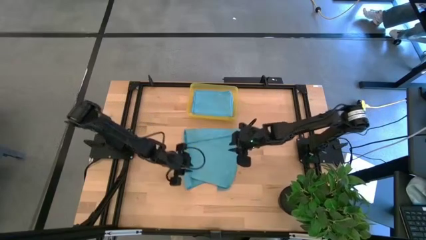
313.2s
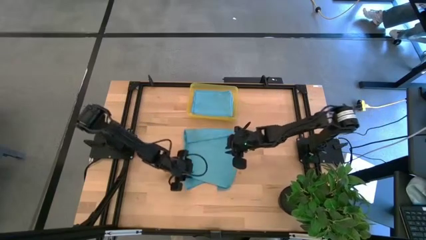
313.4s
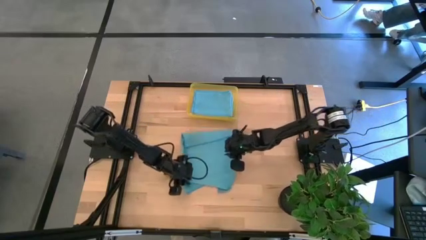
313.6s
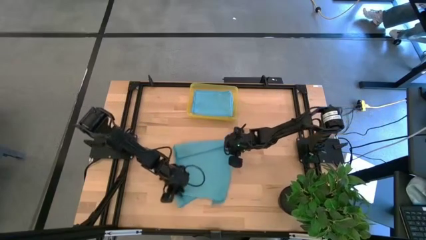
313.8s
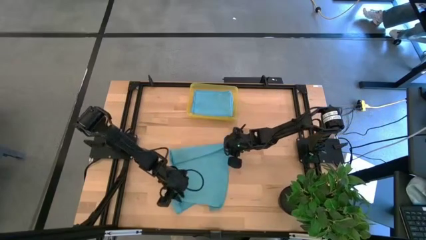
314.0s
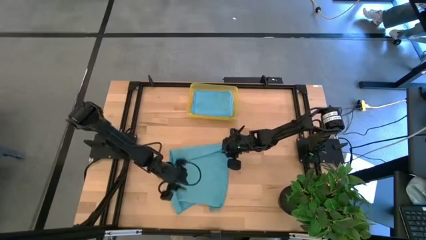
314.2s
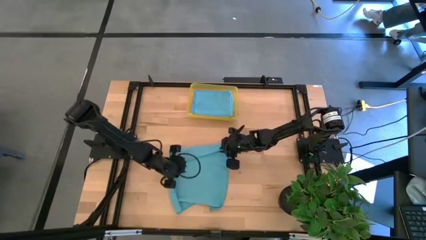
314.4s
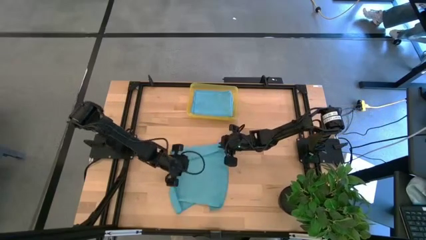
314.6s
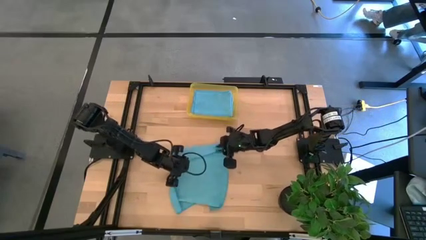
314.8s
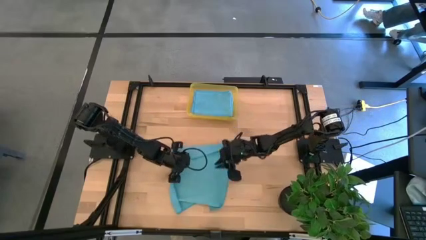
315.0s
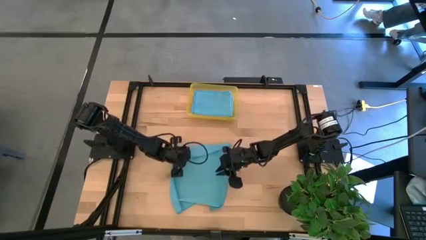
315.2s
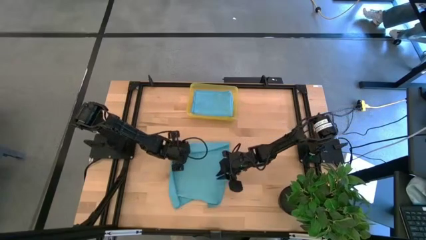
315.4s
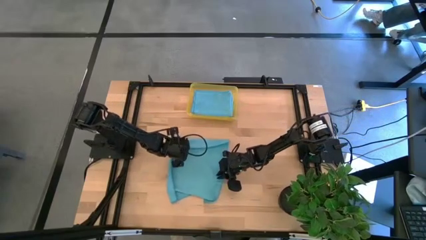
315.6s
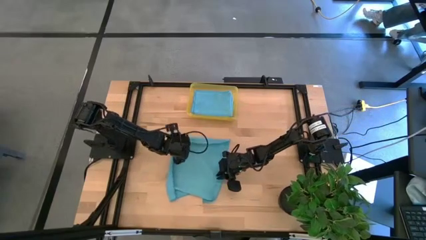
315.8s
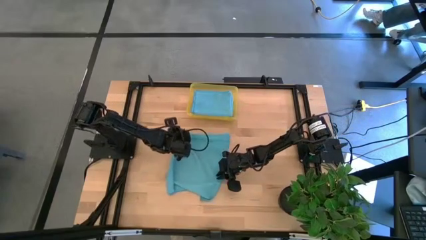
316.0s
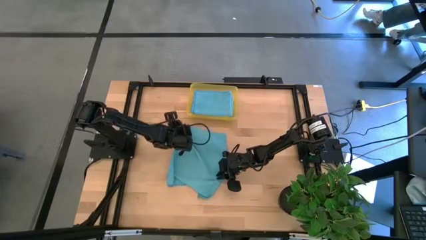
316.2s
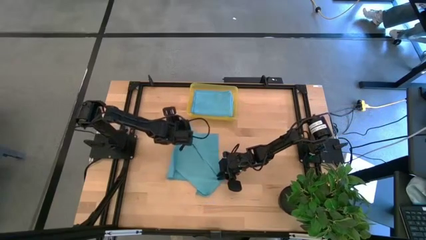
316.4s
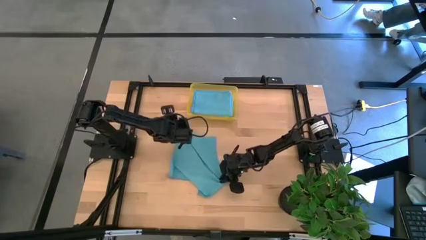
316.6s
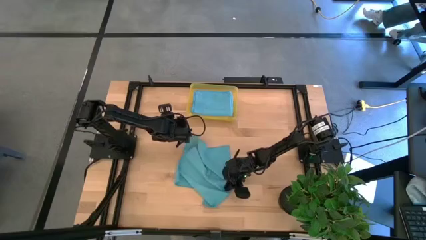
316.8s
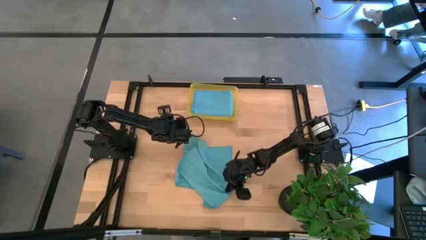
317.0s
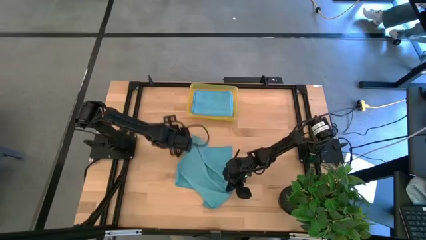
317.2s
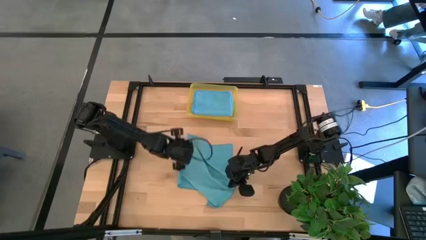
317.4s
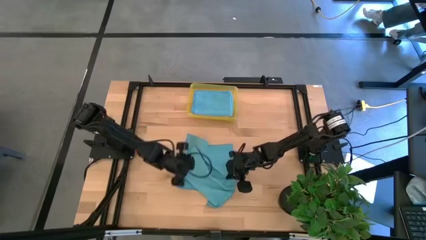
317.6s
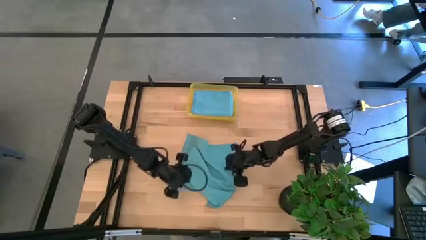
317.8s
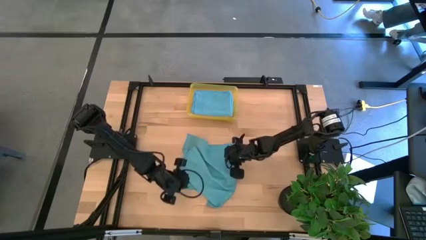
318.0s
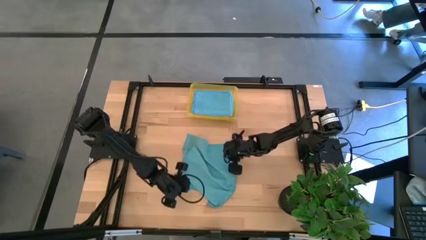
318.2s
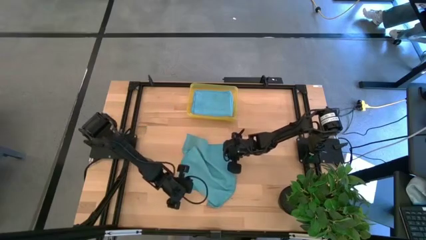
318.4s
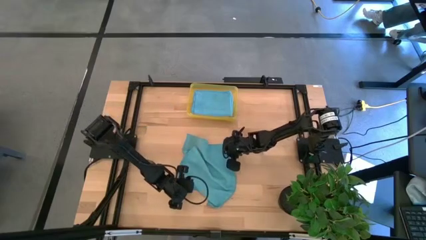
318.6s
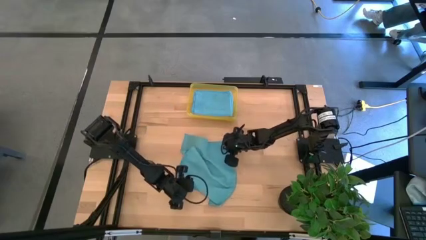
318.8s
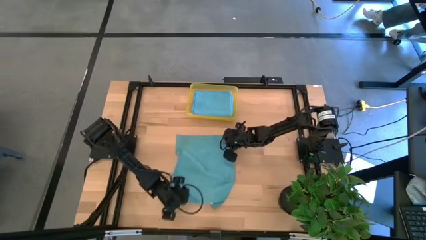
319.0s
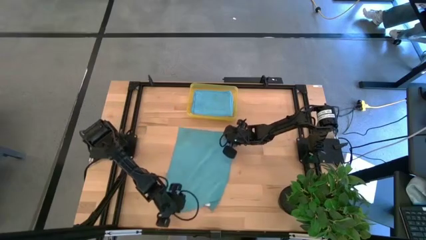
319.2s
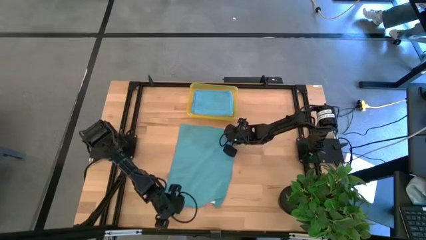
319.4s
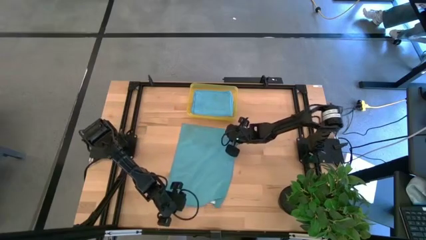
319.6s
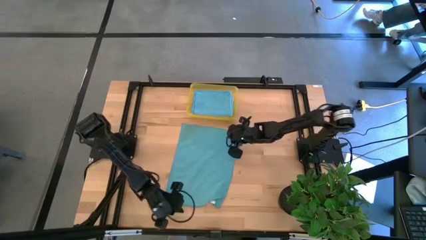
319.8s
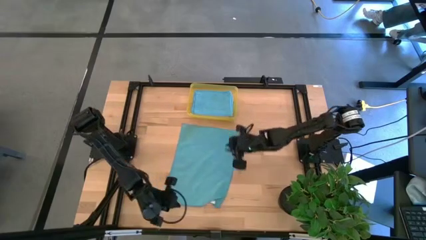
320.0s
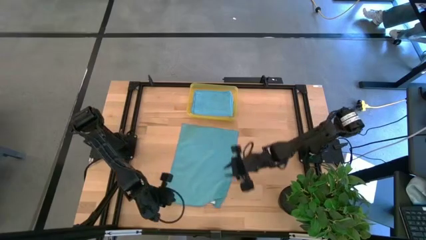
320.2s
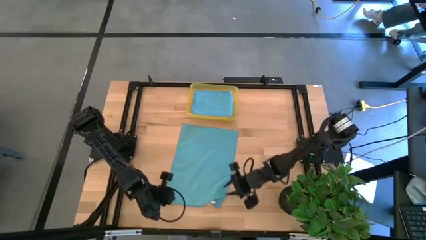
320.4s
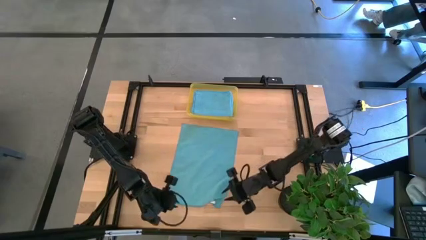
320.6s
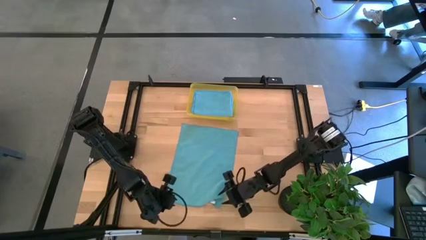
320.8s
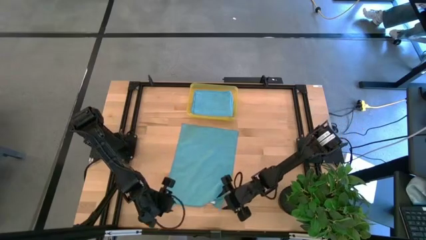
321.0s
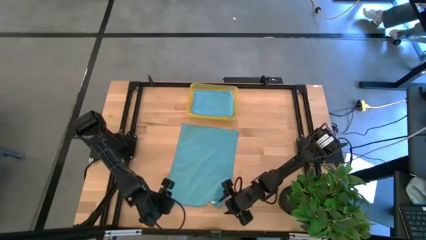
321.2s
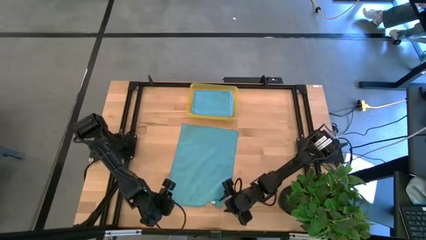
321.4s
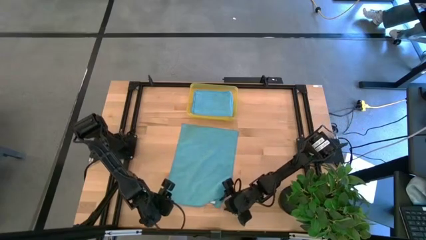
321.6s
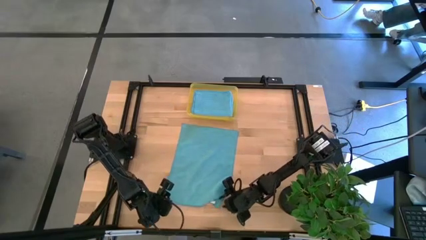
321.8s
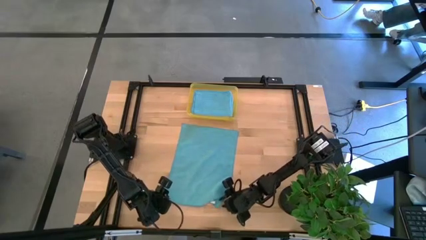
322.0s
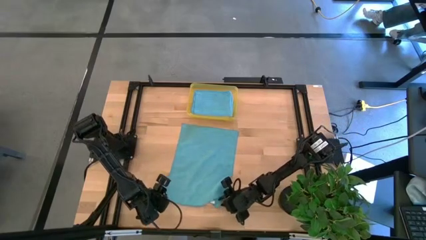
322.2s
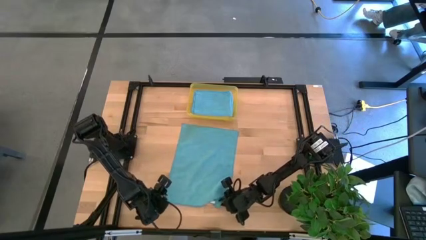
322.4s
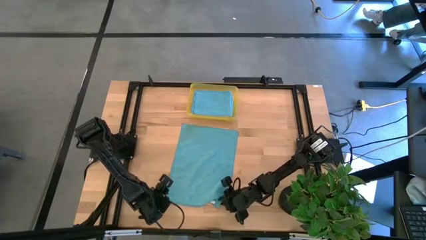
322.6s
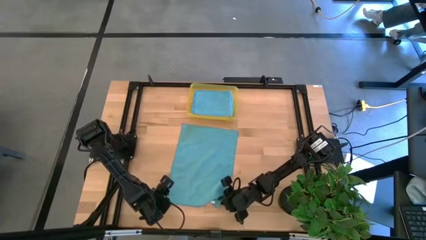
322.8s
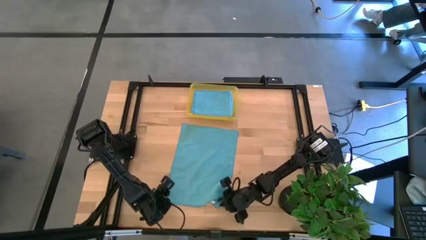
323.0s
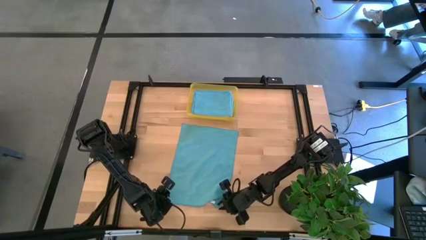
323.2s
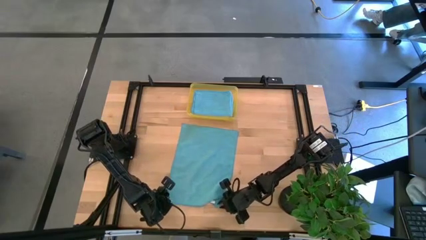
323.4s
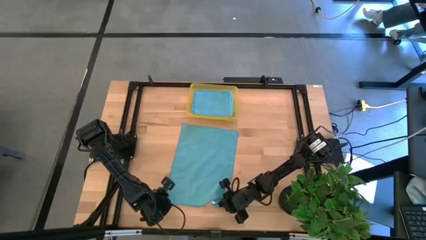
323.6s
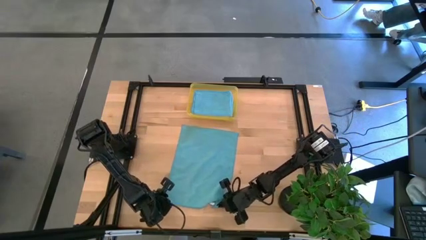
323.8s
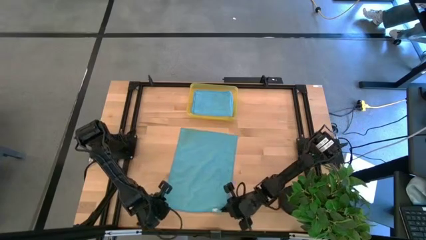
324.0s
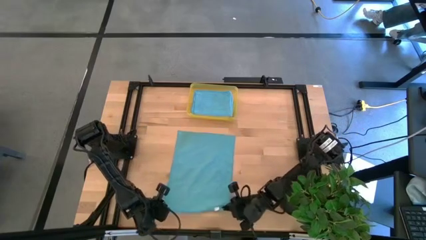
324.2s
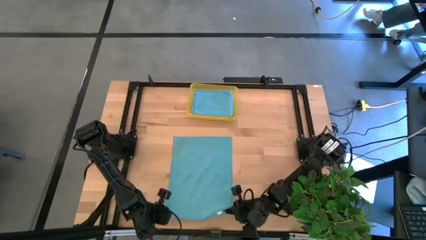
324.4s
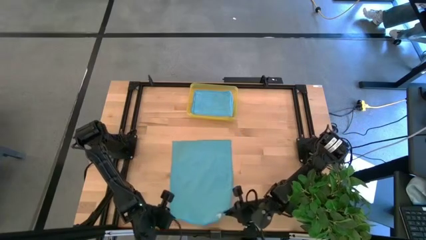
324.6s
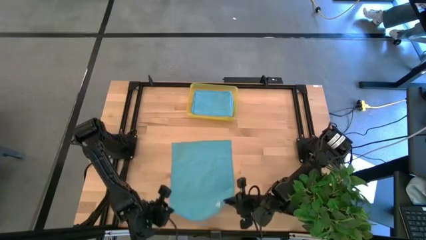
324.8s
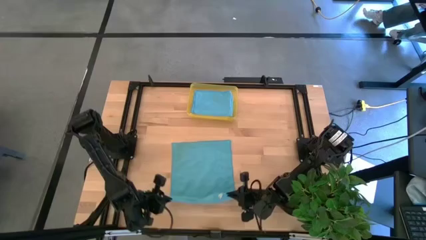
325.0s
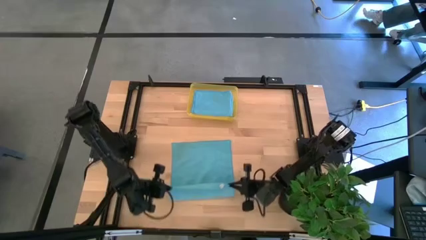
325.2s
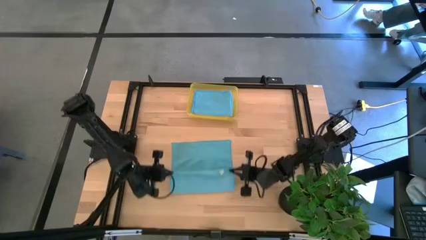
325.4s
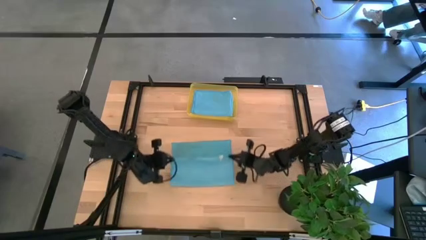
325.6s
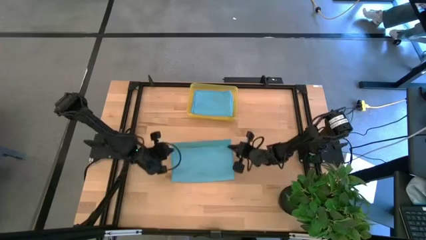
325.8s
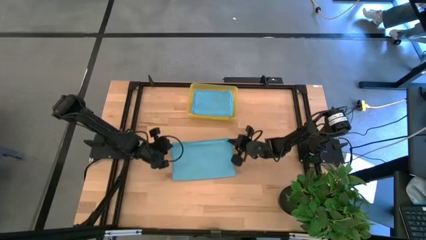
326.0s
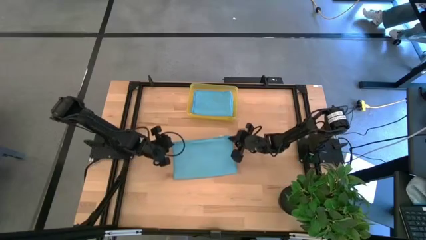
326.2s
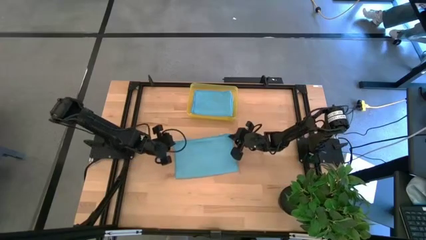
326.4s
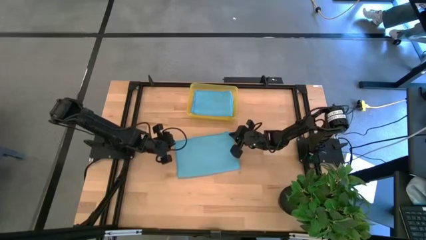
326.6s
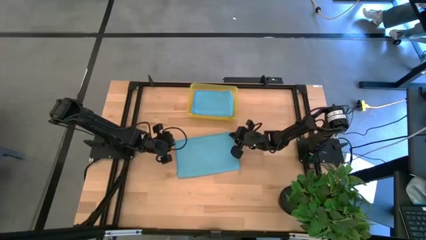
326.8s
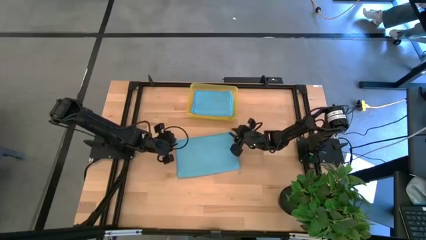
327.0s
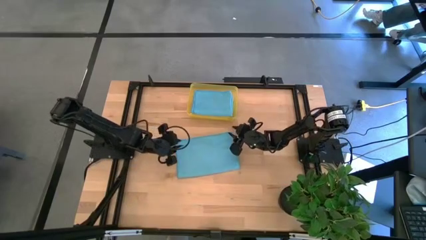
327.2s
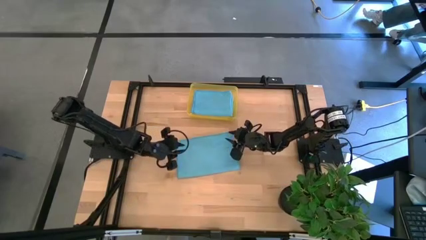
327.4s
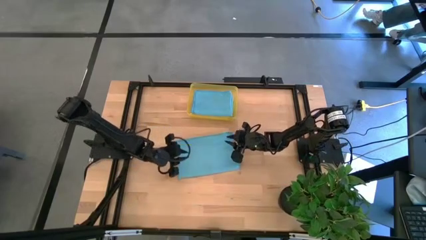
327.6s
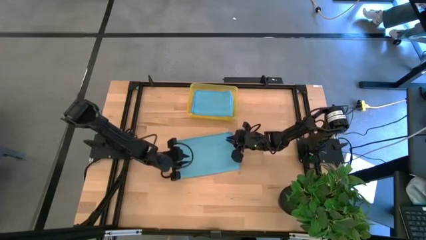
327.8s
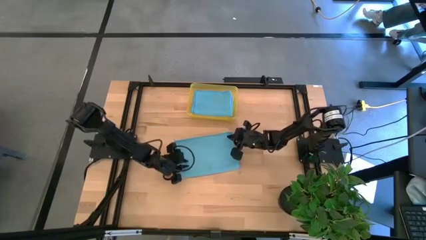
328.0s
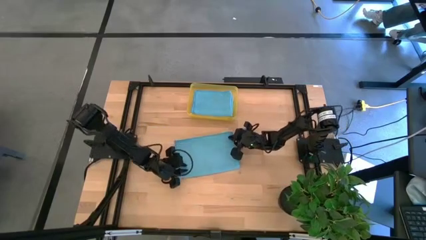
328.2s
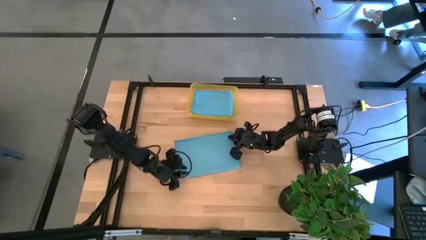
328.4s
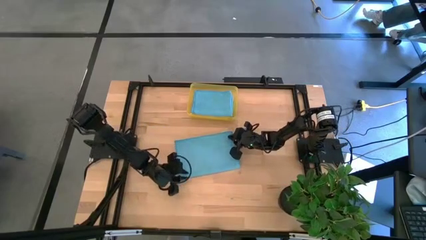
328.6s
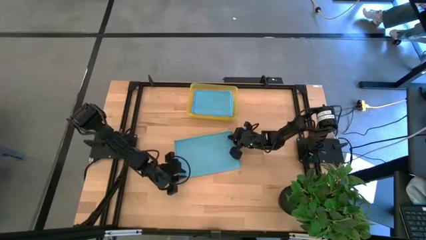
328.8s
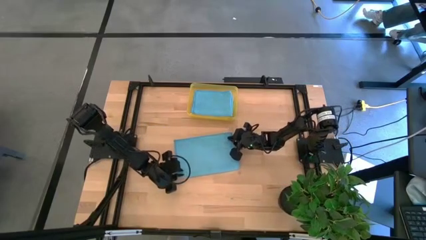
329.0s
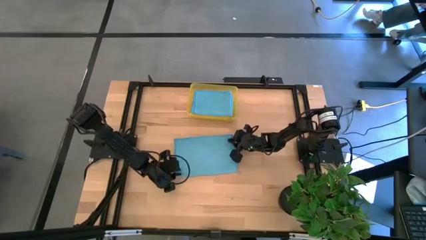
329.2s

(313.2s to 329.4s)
Task: Fold microfiber towels
Fold the blue towel
